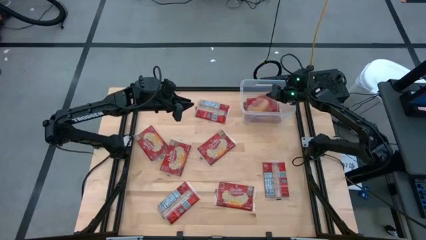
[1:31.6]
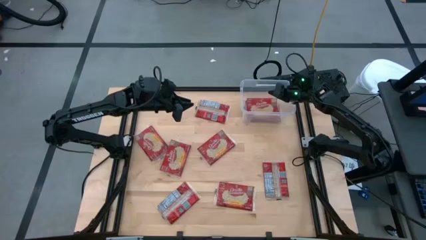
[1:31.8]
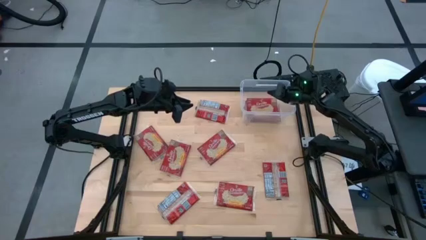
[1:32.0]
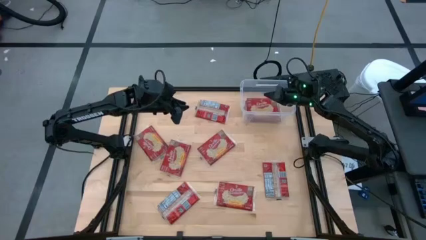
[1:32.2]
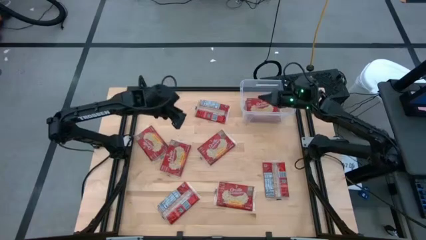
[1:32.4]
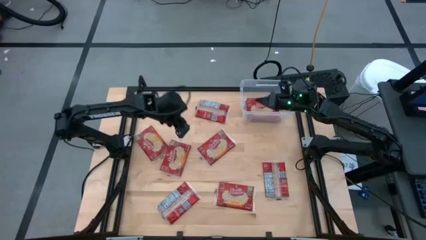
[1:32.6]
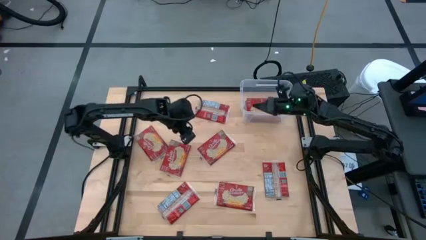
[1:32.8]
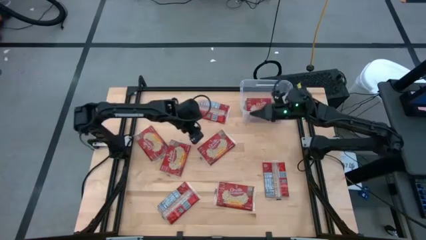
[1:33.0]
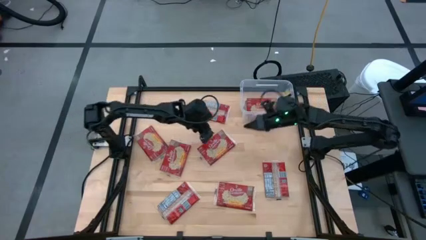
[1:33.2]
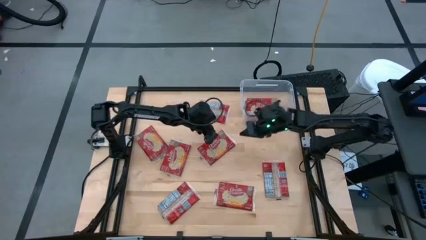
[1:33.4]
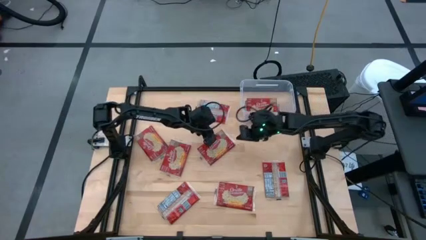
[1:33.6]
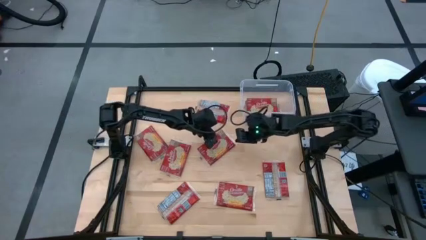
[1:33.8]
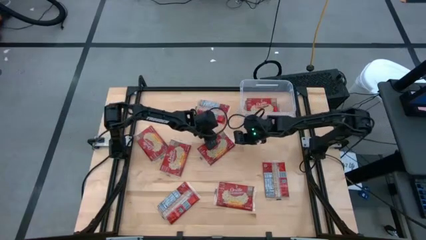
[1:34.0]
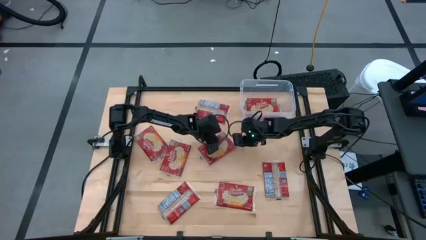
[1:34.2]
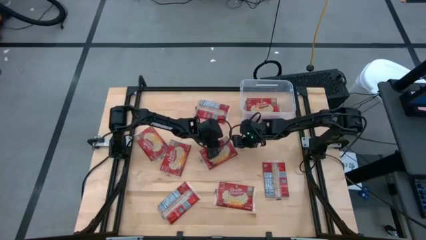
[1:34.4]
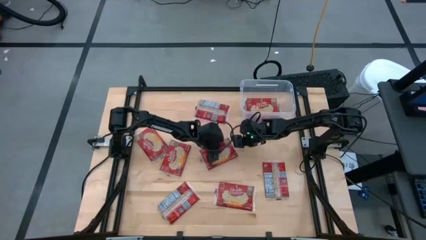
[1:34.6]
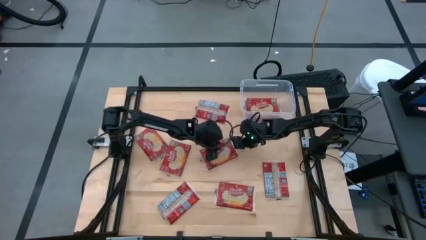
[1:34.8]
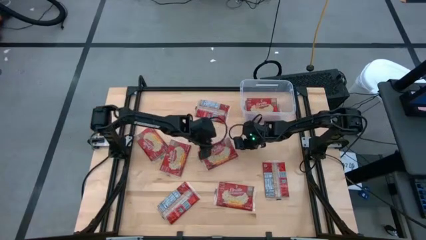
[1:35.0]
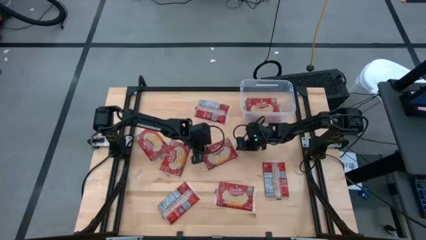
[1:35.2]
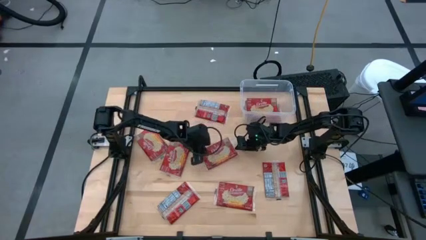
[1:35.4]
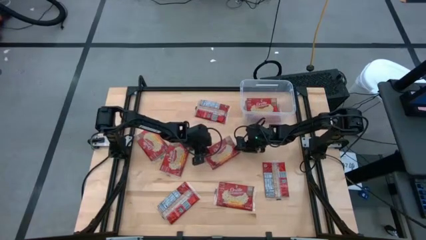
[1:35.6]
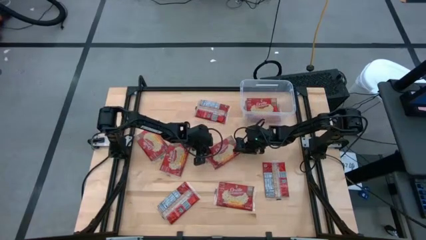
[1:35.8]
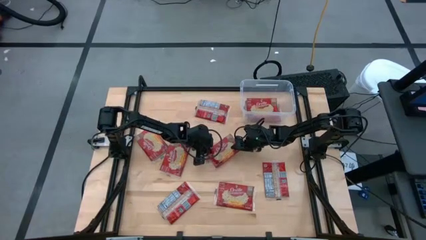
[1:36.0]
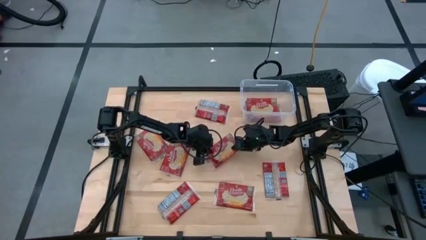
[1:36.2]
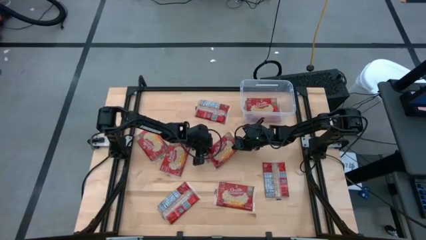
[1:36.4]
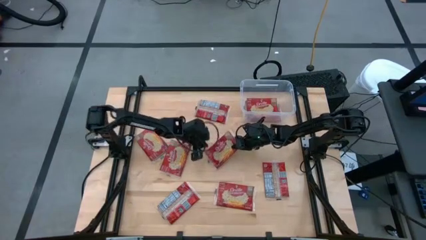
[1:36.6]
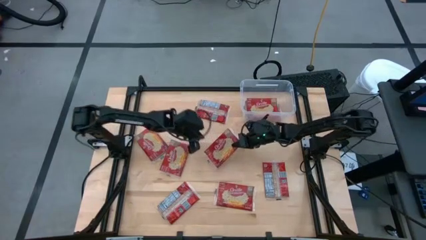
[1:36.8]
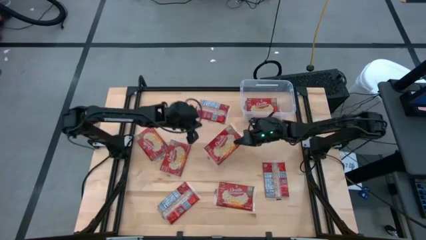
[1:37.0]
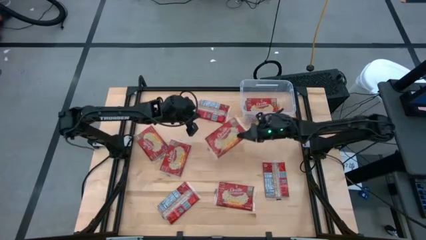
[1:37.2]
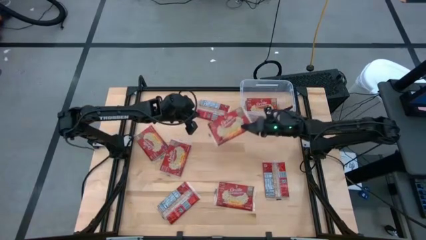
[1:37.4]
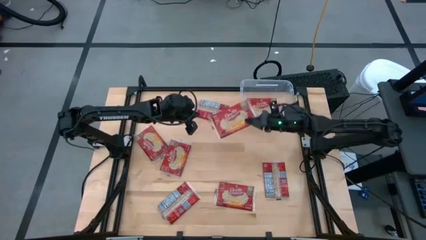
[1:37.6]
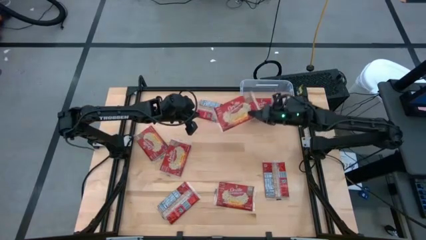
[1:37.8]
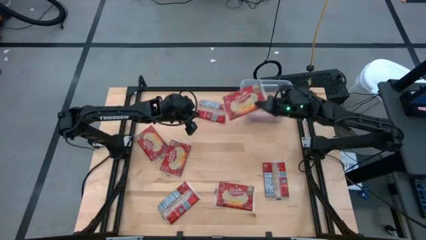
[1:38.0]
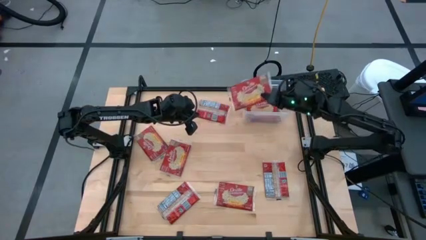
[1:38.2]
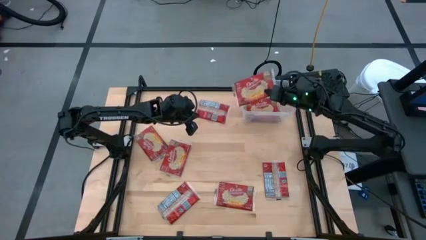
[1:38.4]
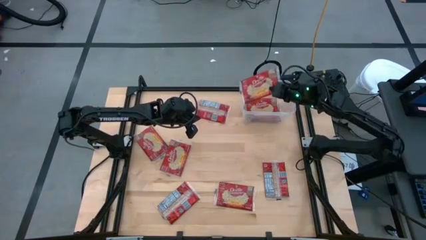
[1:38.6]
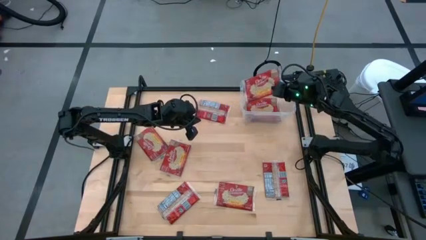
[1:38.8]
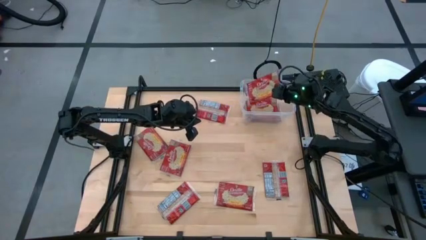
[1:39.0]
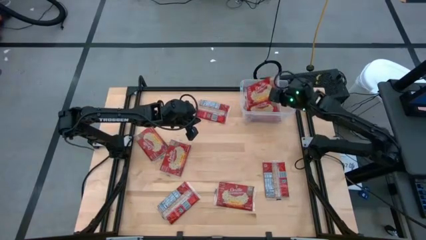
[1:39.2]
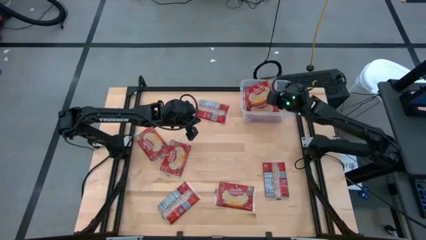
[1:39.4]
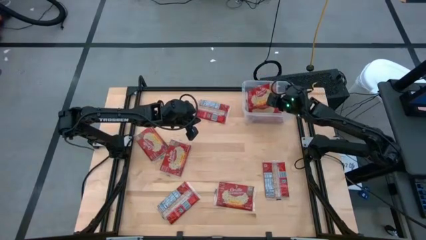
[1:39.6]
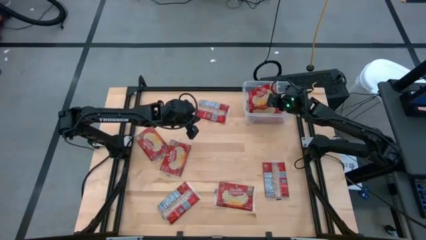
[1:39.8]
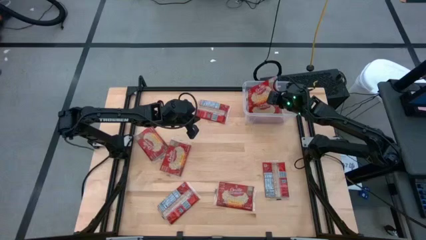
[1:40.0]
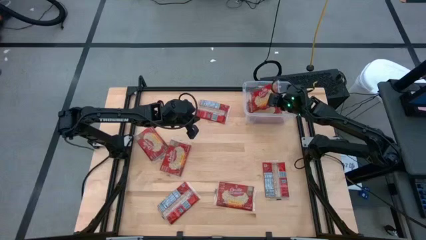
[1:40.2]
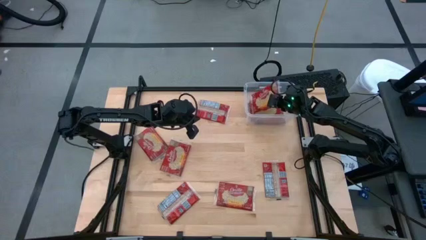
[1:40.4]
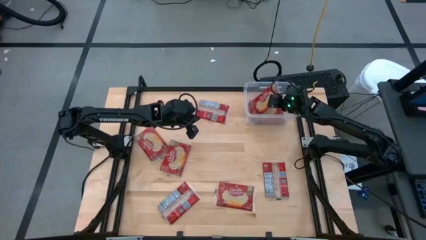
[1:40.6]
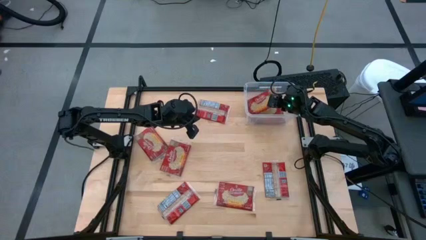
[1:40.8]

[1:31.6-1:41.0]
Task: Sort popcorn bags into baskets
Put the popcorn bag into the transparent container

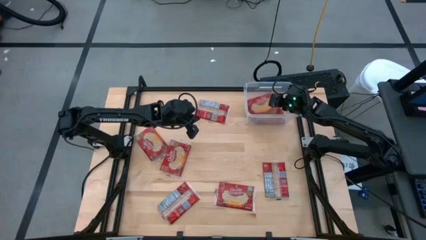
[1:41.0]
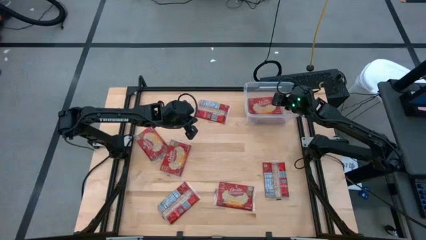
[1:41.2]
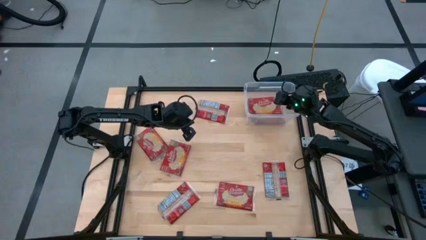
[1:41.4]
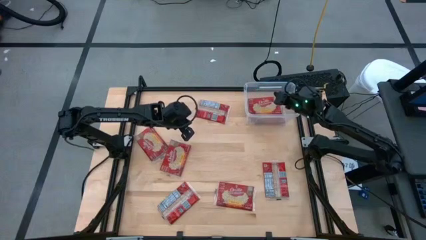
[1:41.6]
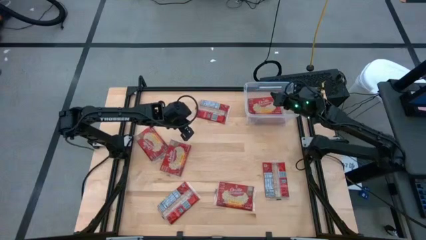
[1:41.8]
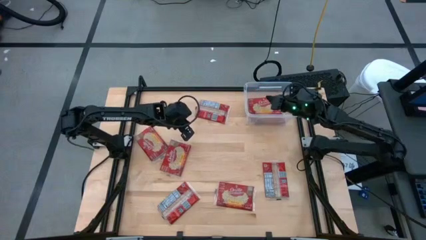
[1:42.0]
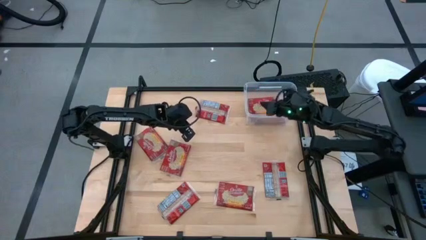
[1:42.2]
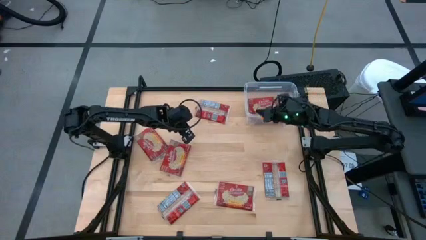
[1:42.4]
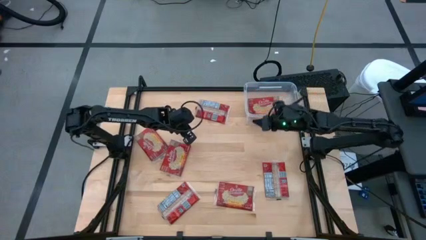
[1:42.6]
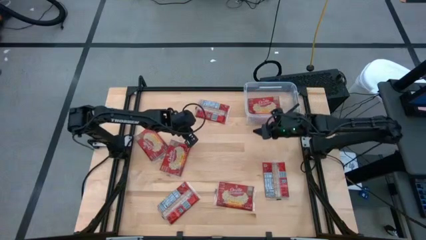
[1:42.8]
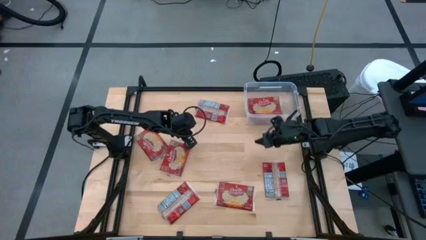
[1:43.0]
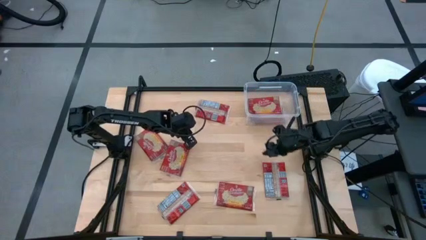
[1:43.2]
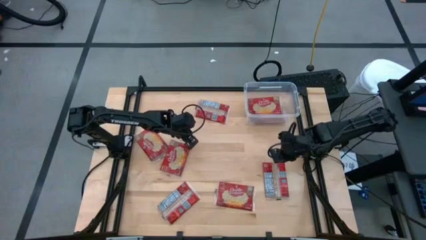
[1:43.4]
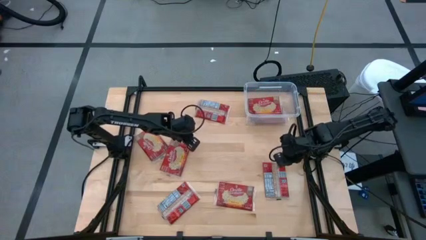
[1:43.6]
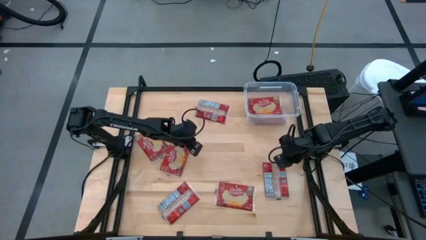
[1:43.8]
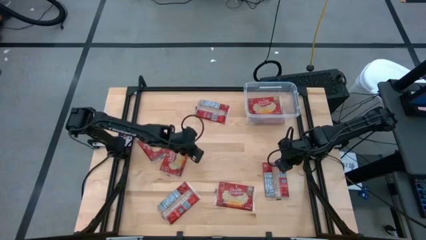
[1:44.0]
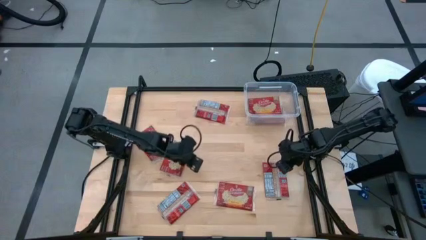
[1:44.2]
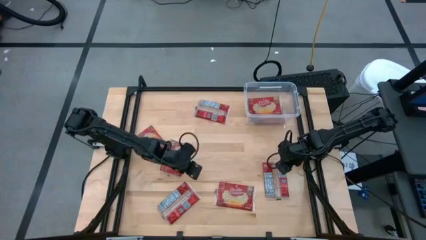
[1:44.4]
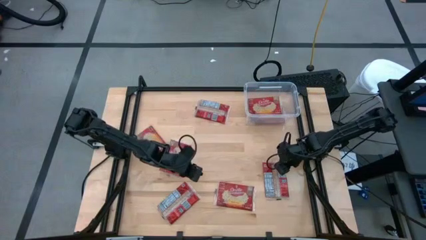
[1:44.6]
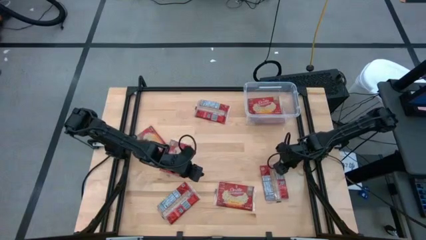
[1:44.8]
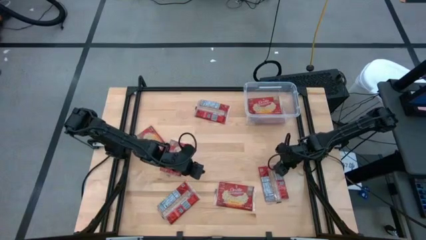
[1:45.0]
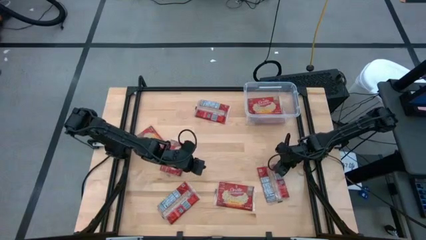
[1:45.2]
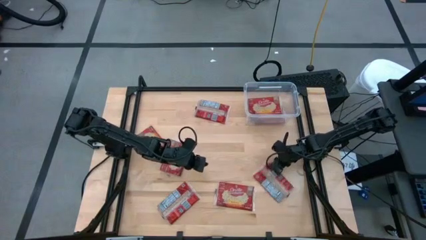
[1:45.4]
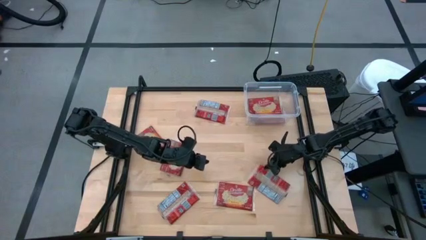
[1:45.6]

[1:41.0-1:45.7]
Put the popcorn bag into the transparent container
